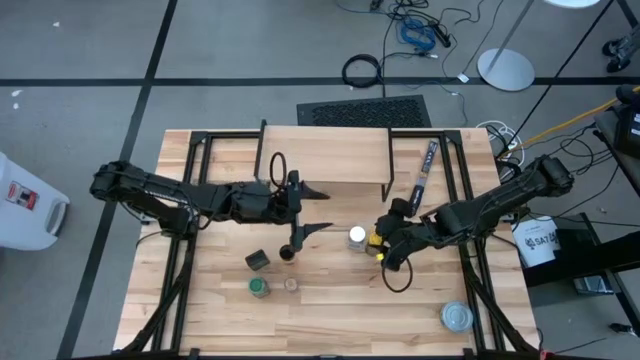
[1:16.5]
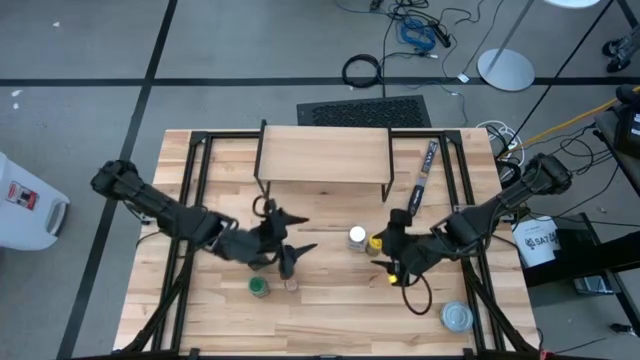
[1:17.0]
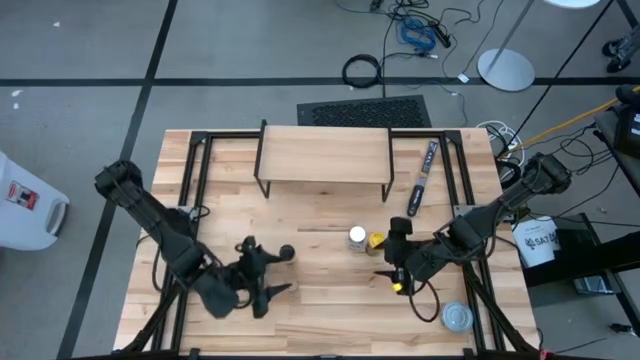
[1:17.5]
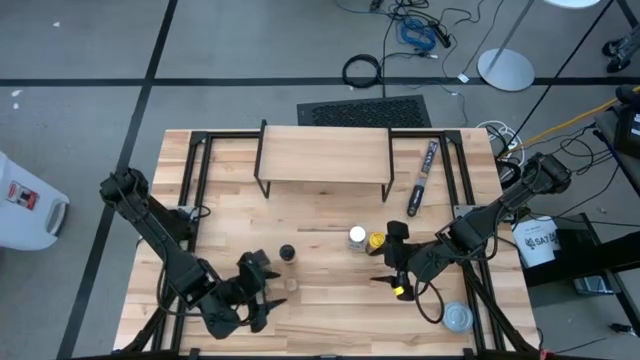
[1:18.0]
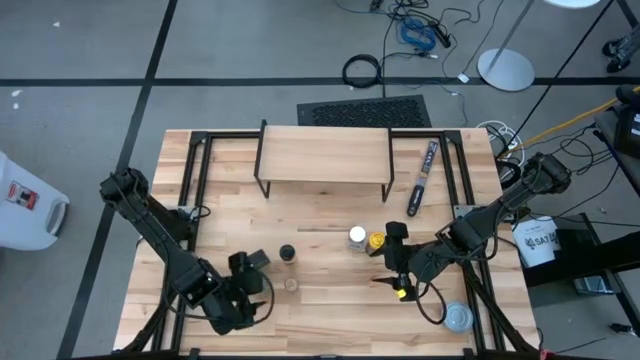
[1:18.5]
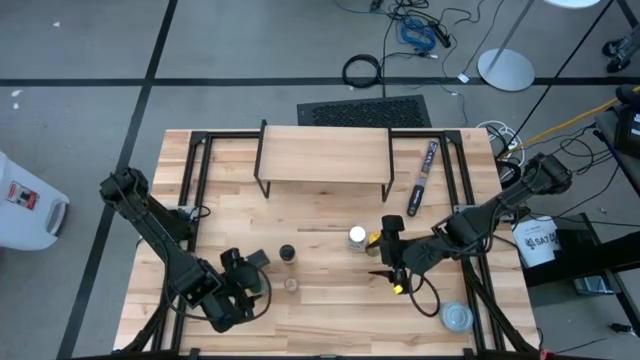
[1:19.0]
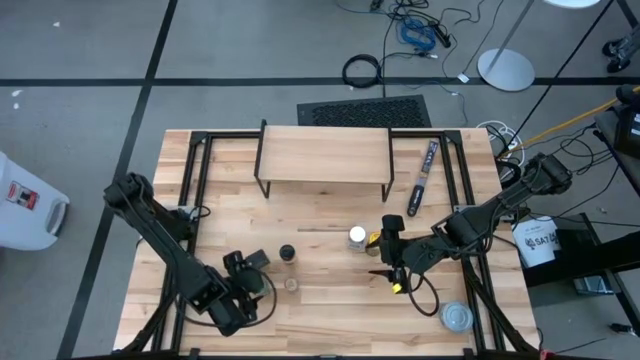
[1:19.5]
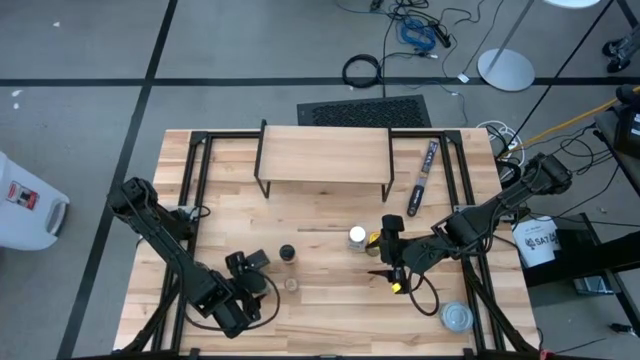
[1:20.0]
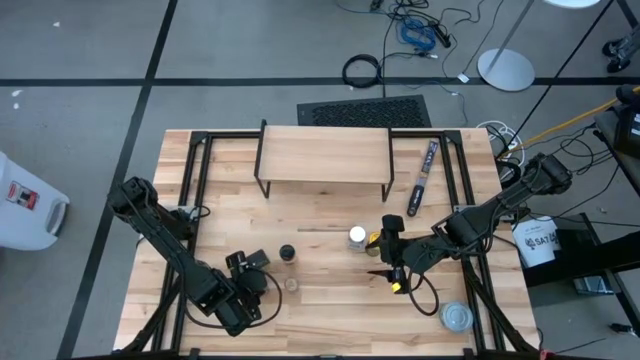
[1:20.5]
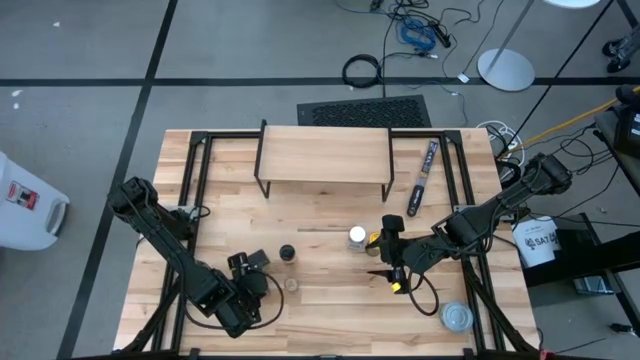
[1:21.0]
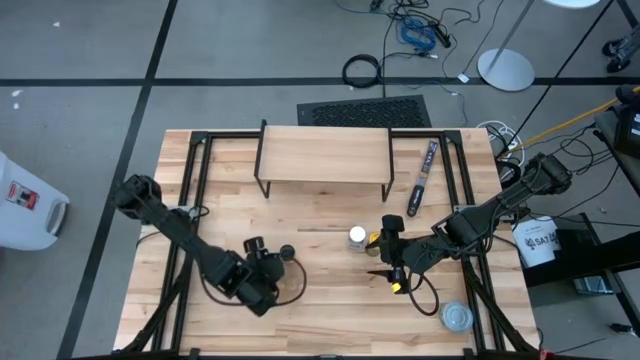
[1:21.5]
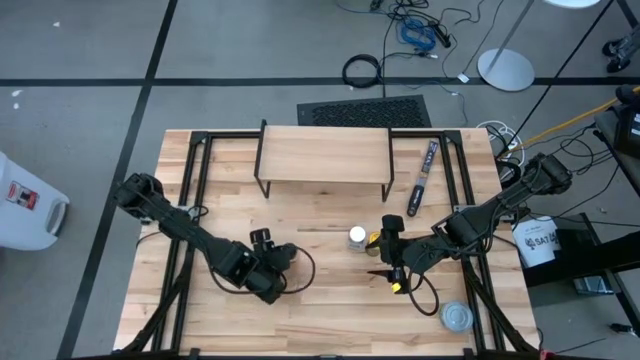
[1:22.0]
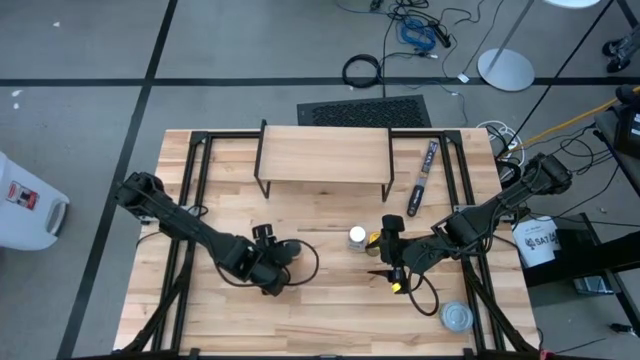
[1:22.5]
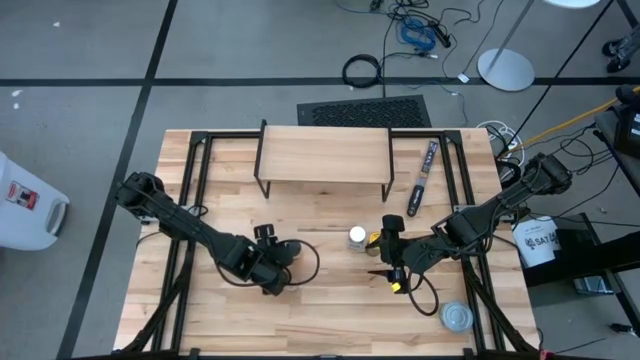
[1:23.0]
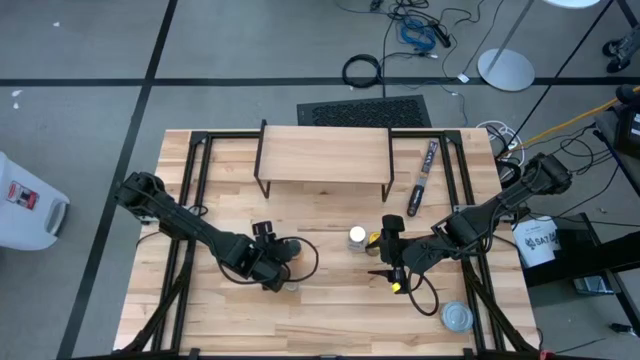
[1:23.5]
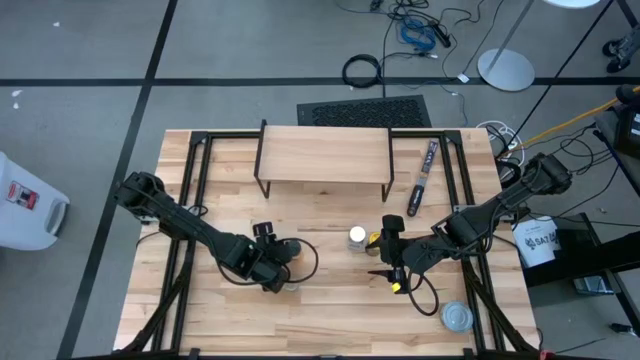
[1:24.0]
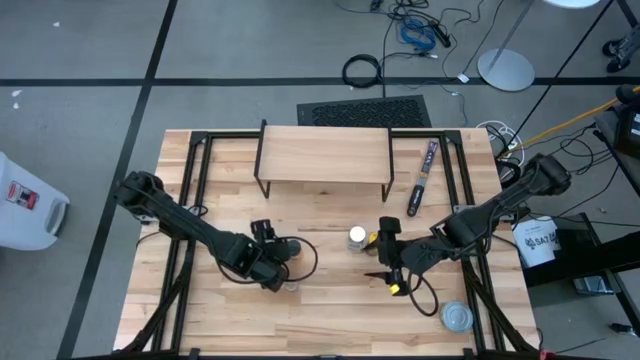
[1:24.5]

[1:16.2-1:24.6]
Task: Shelf spices
Move the green seasoning bottle between the black seasoning bottles

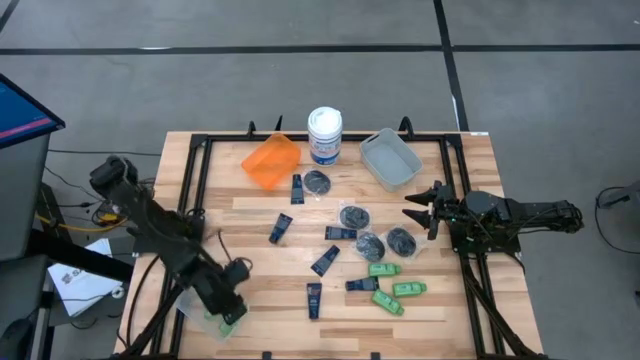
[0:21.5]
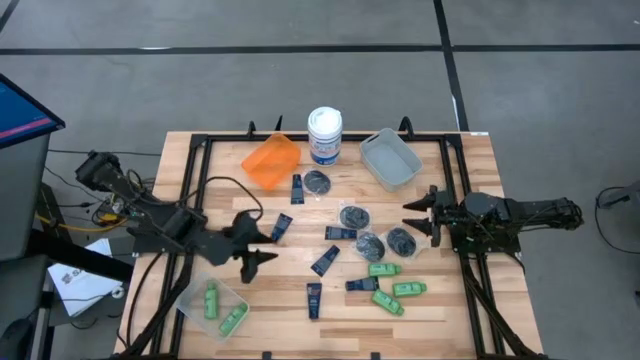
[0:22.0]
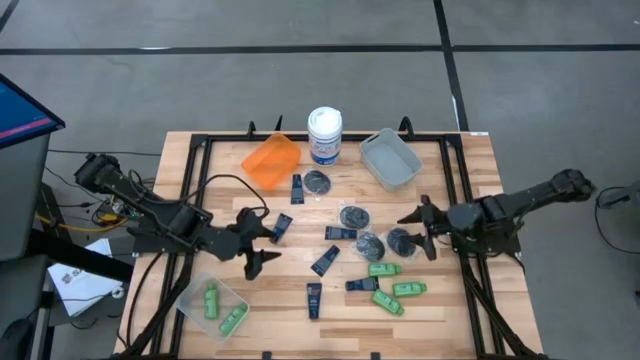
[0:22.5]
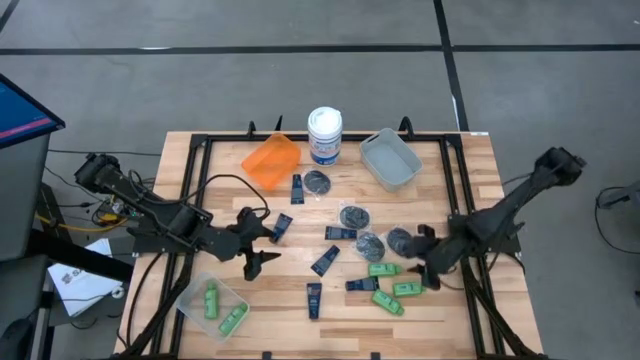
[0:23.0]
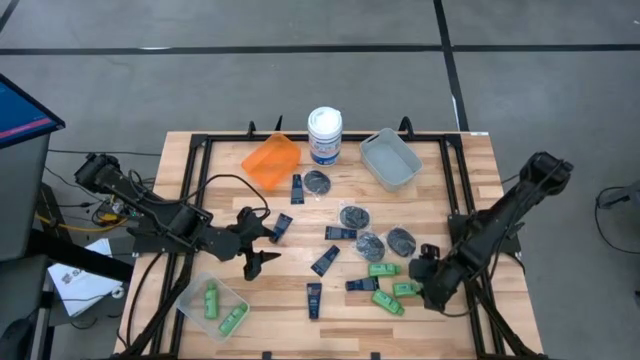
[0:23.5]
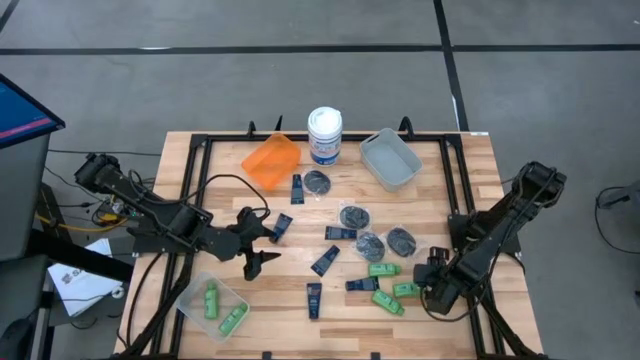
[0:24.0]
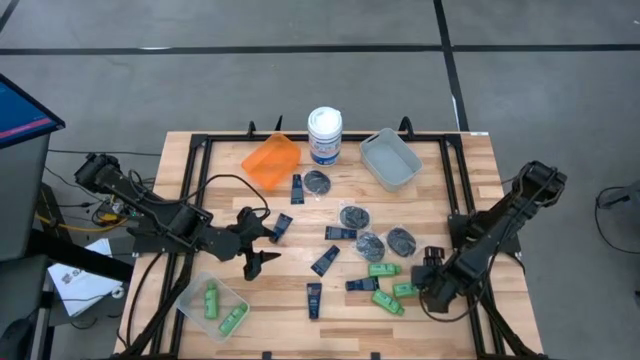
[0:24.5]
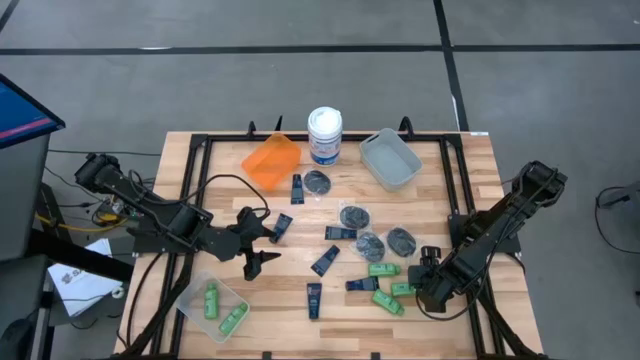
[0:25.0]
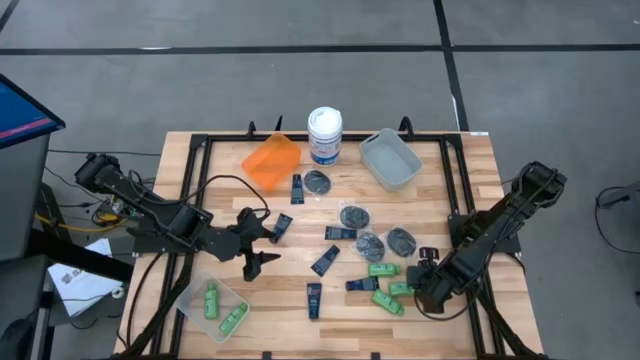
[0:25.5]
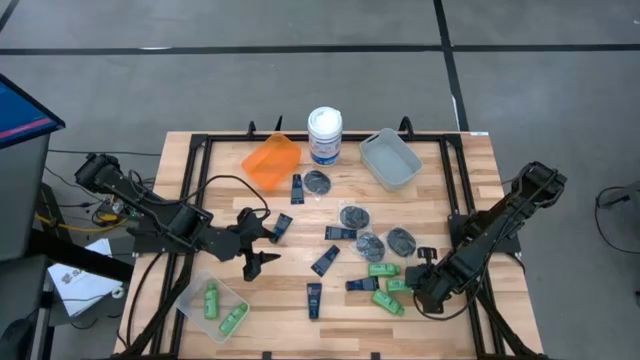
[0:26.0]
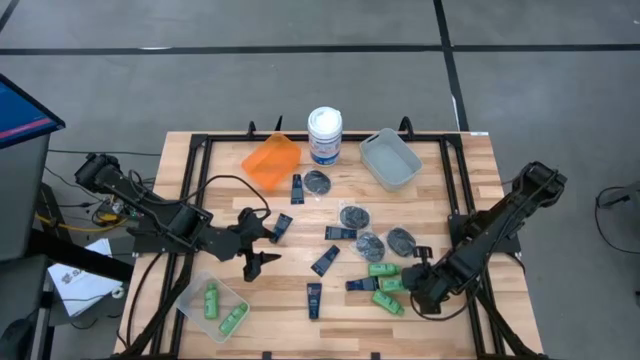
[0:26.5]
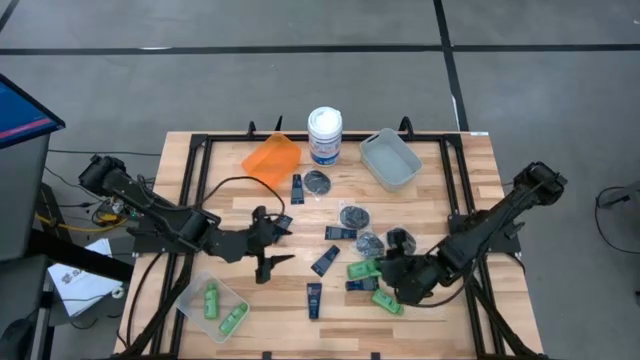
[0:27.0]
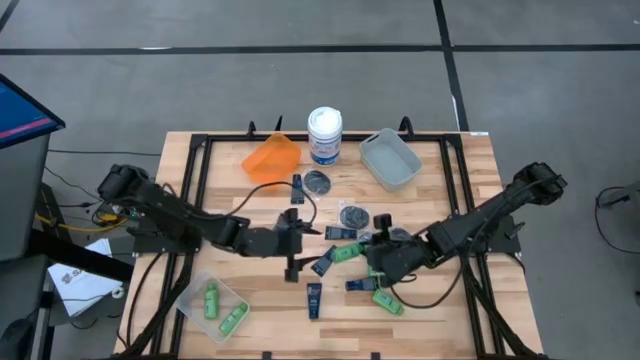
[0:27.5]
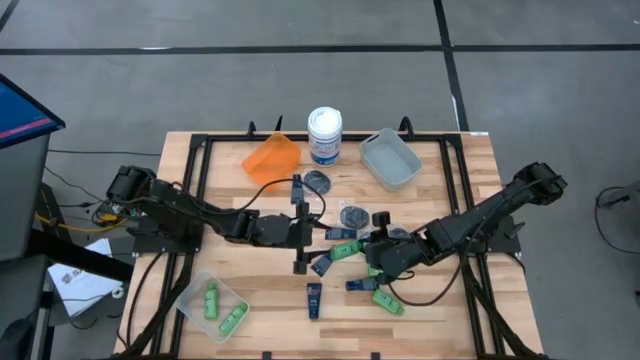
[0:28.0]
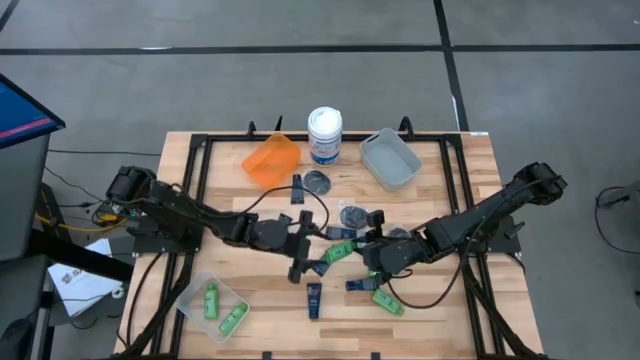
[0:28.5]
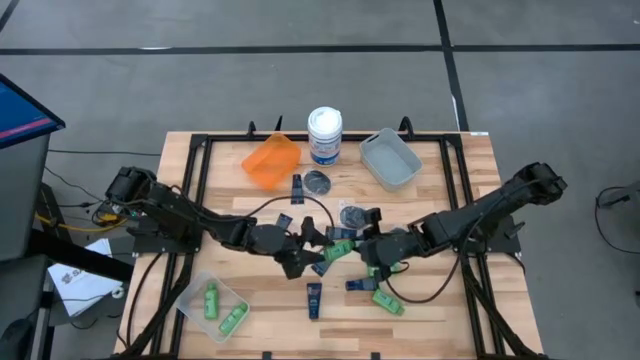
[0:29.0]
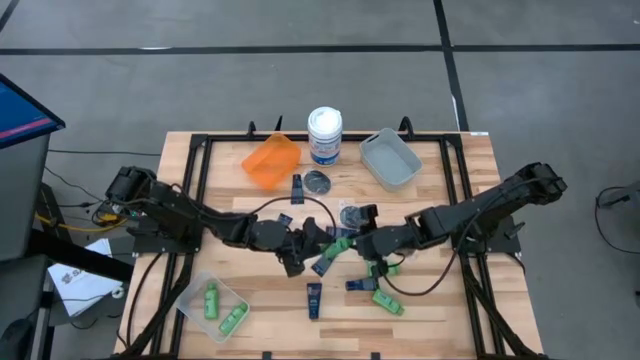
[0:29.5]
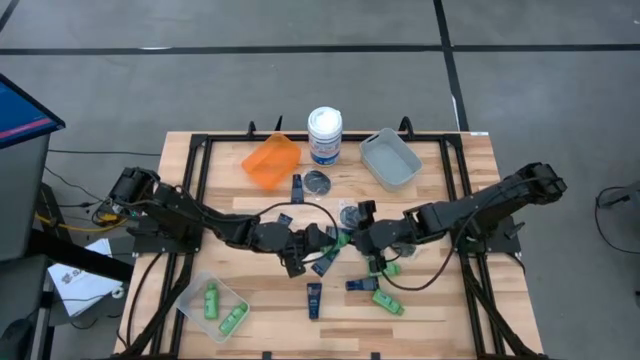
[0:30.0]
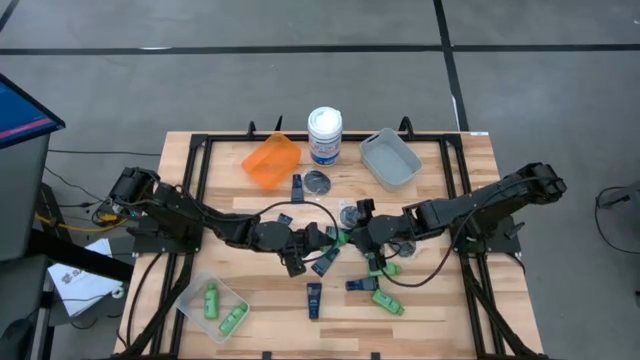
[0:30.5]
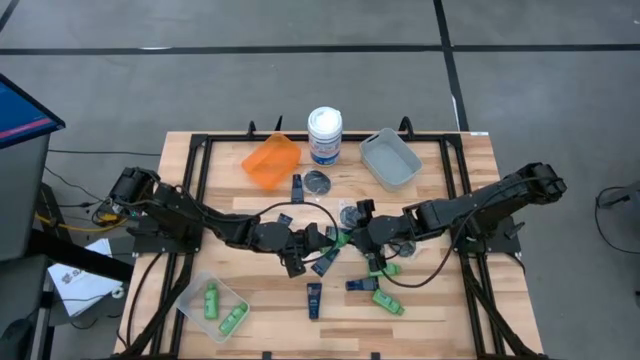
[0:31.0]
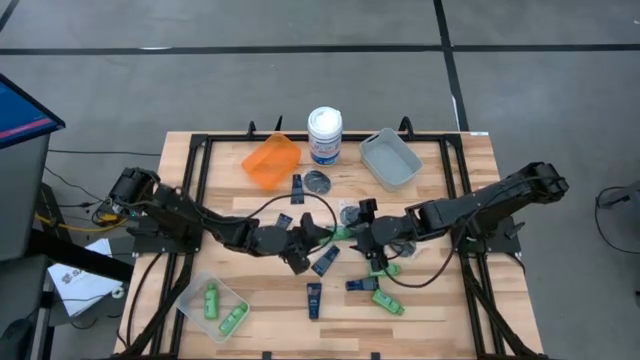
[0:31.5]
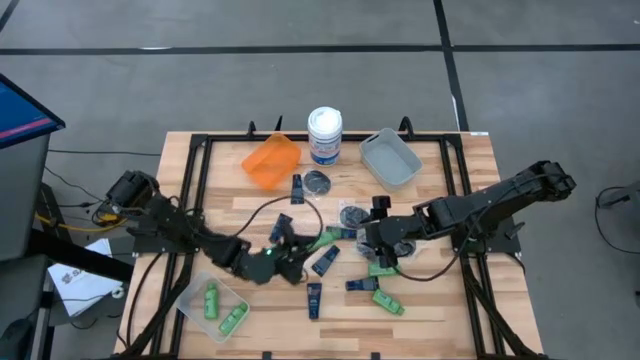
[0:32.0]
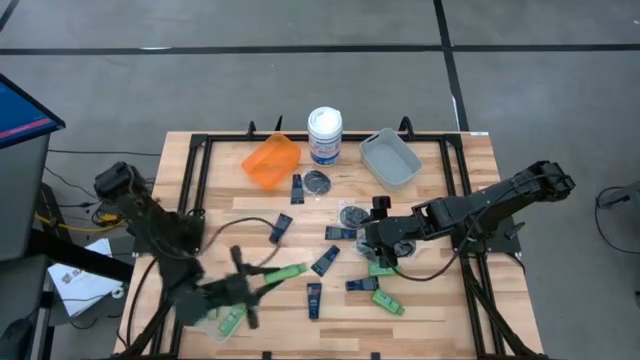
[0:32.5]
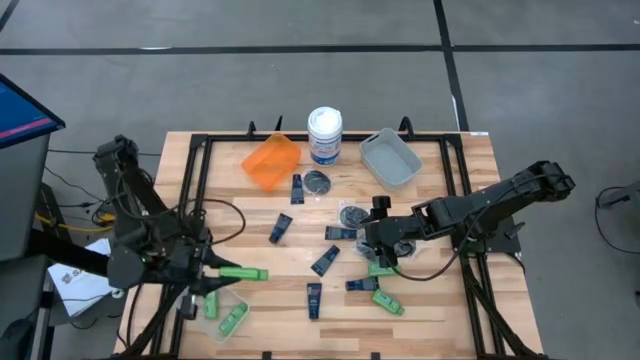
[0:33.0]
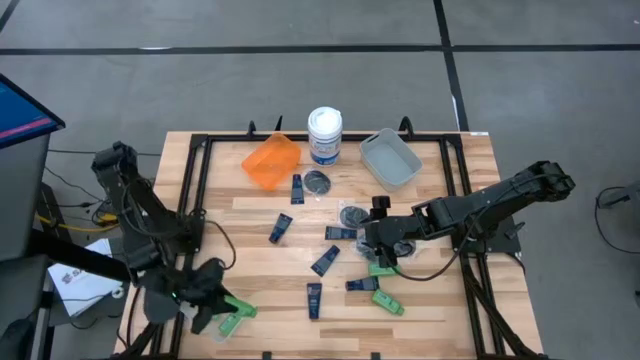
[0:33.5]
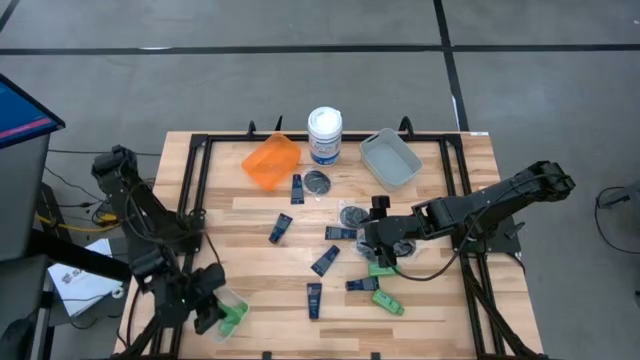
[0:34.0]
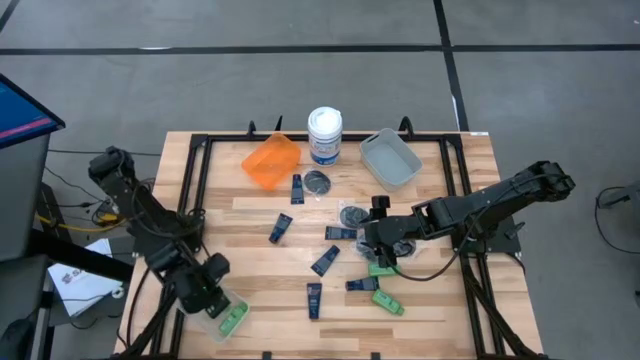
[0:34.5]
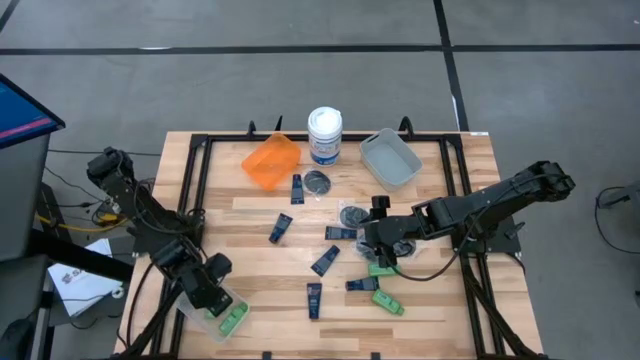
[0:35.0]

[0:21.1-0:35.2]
Task: Pick & Place Travel size toiletries
Put the shampoo into the white bin
